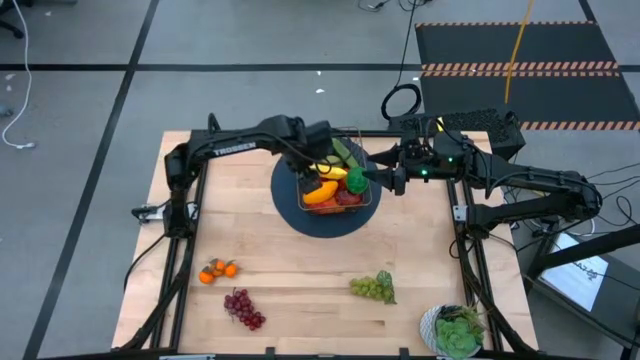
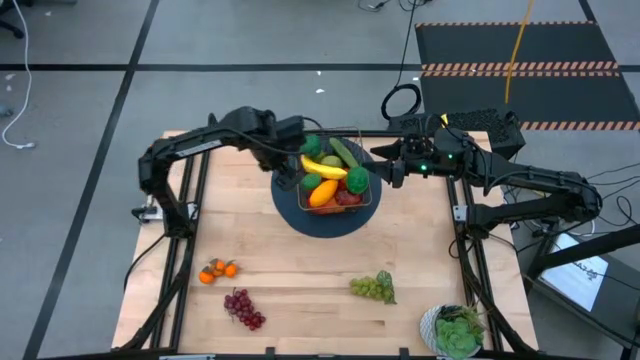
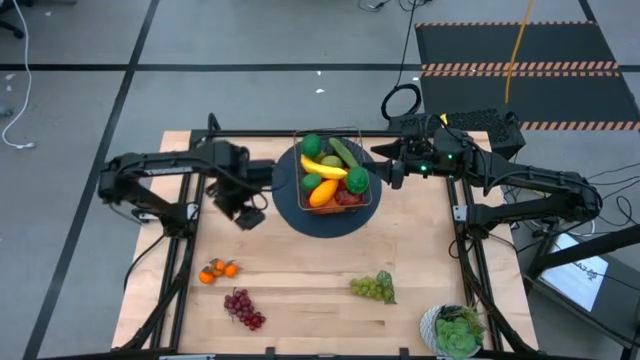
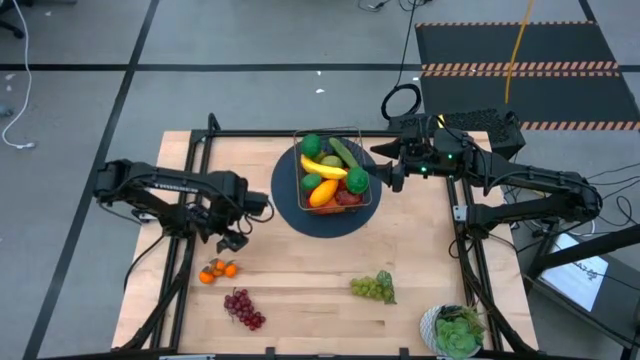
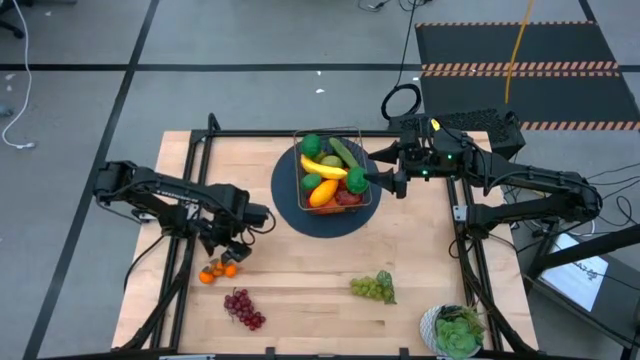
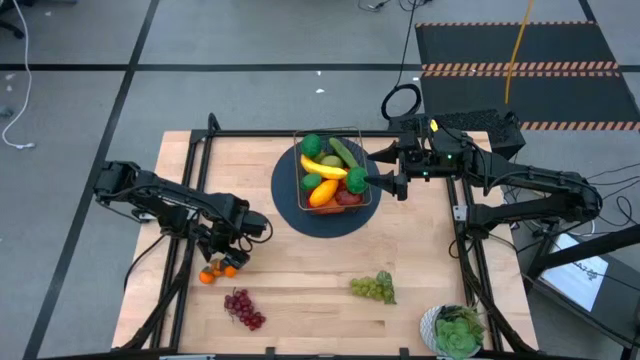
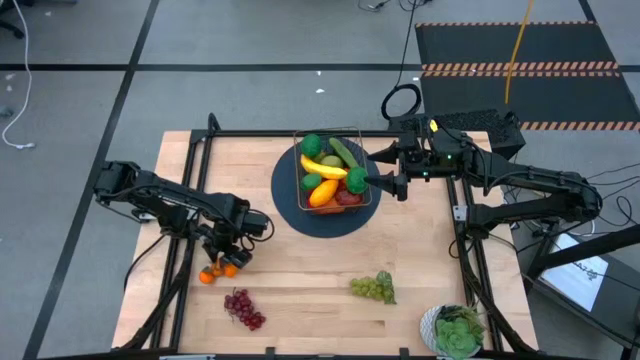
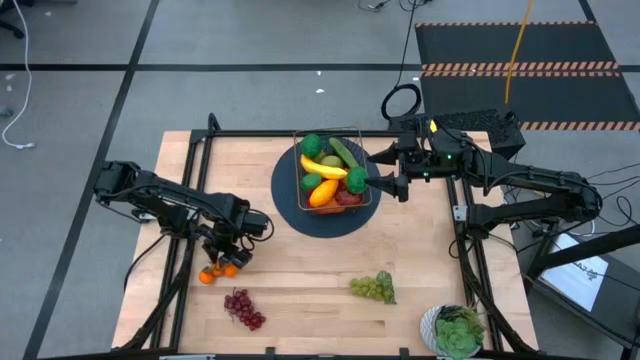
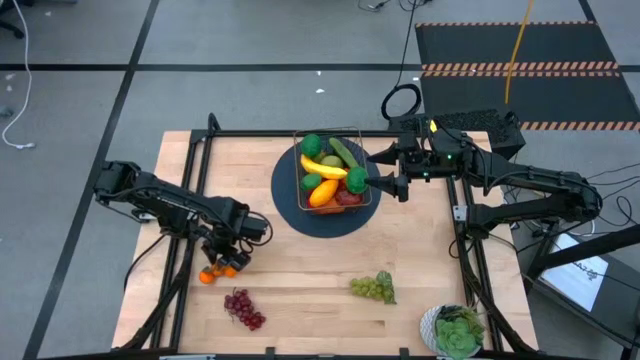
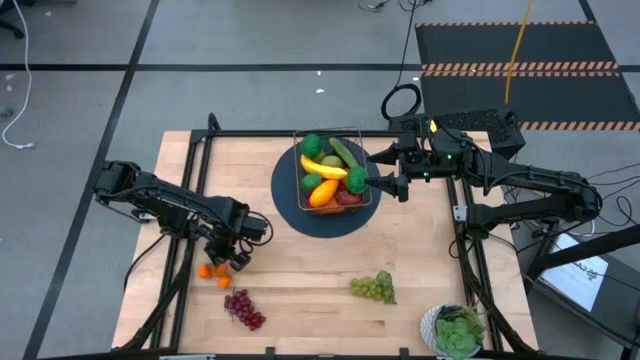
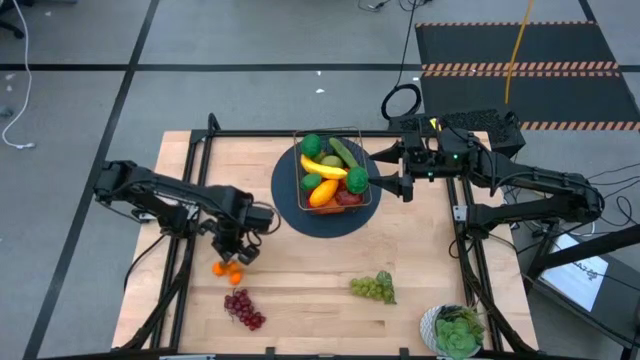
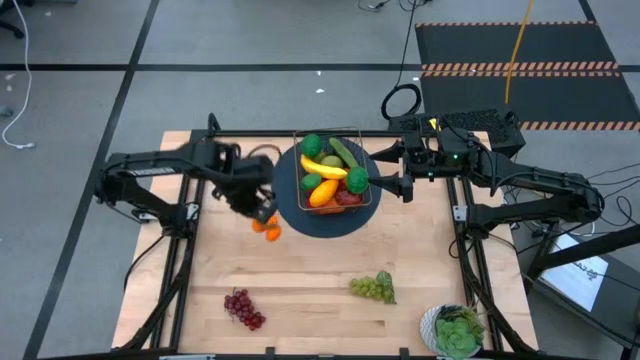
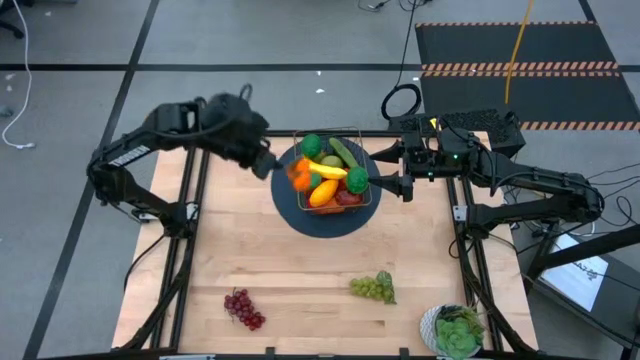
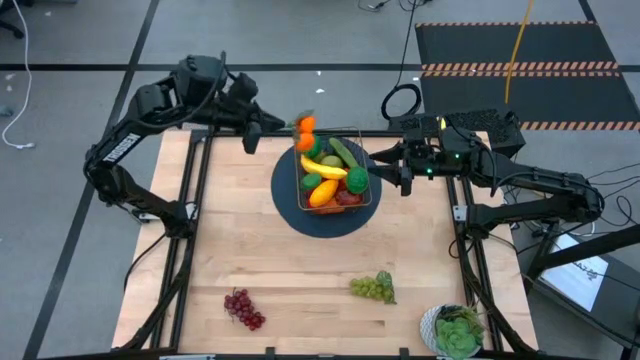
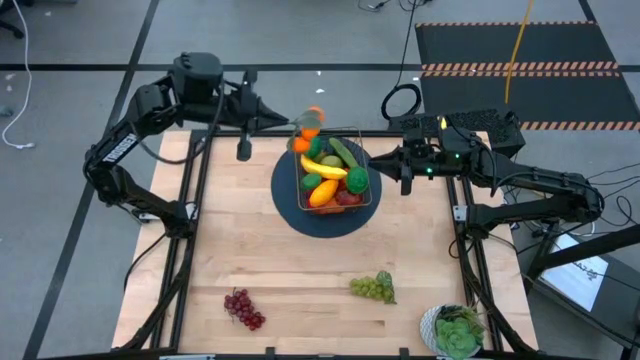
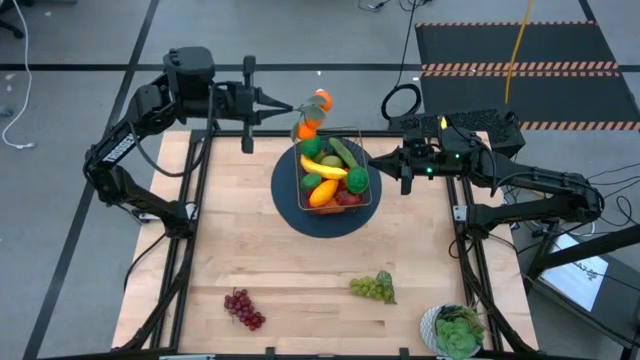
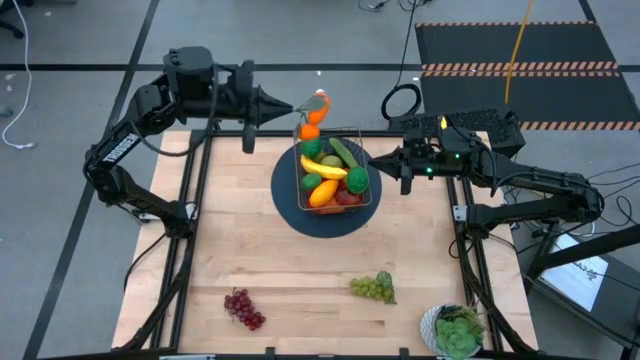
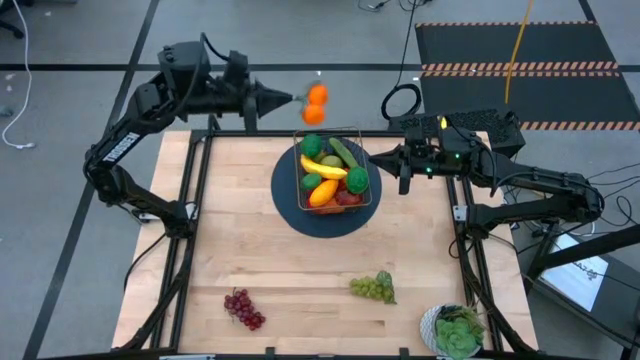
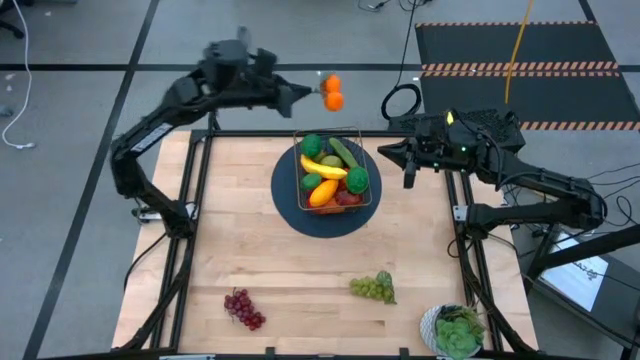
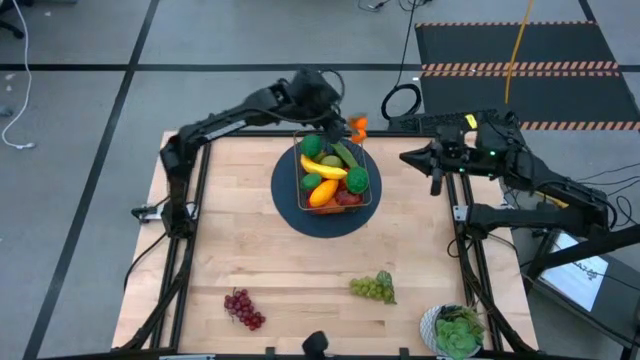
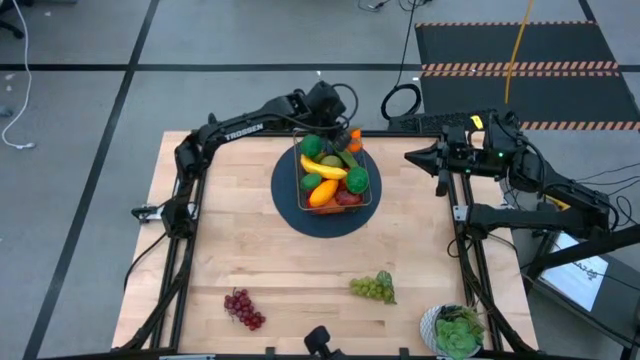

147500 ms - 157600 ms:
Task: Build produce basket
Put the tangerine into the gold wire basket

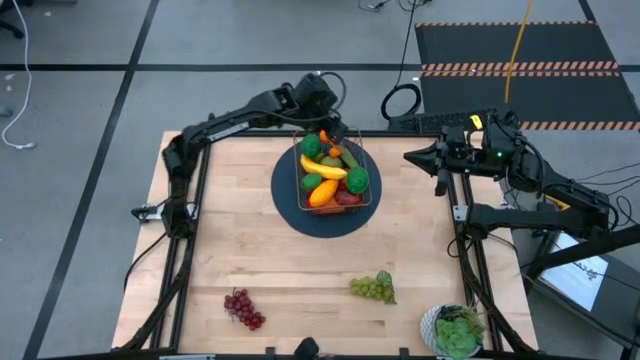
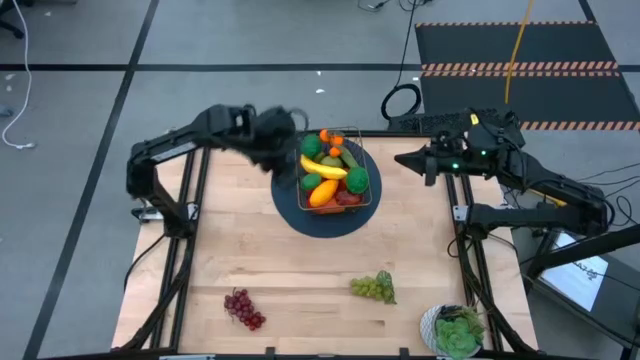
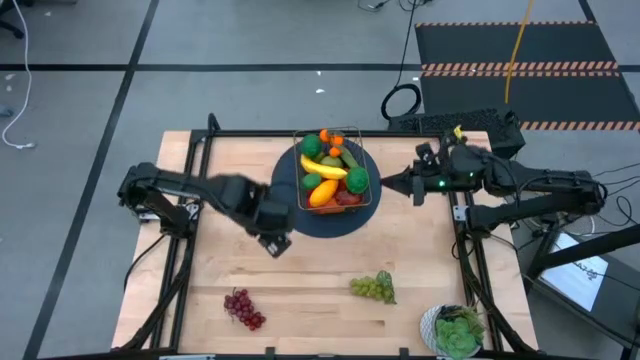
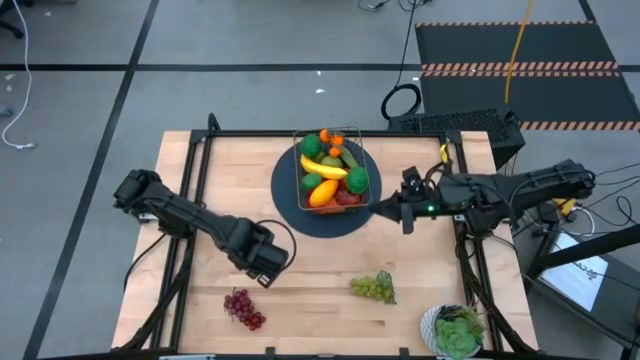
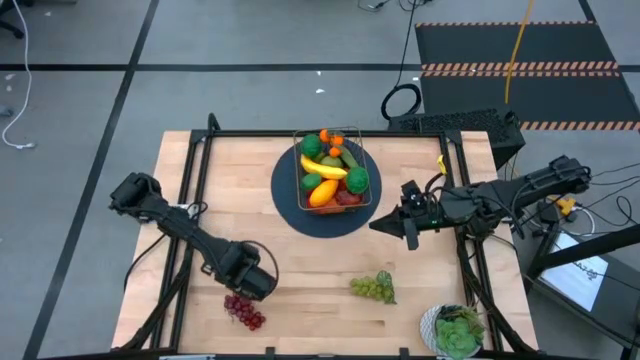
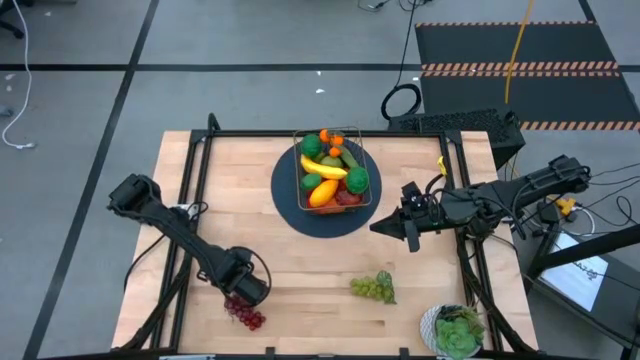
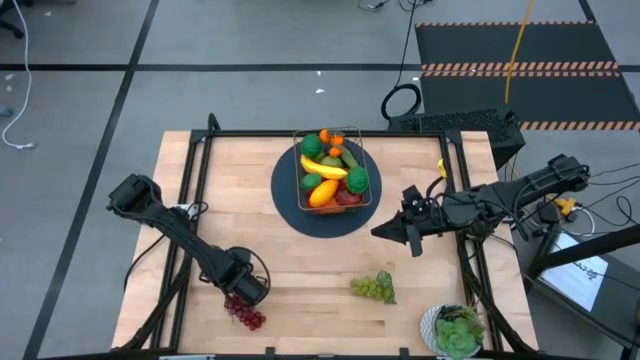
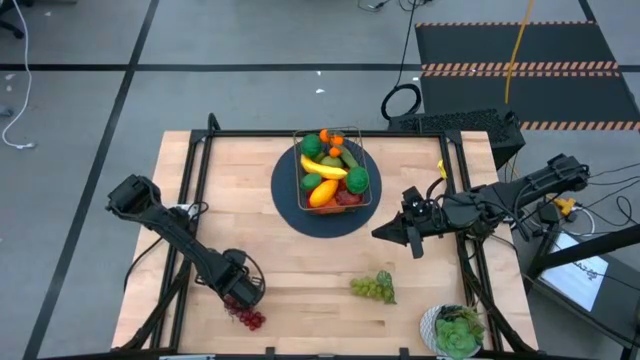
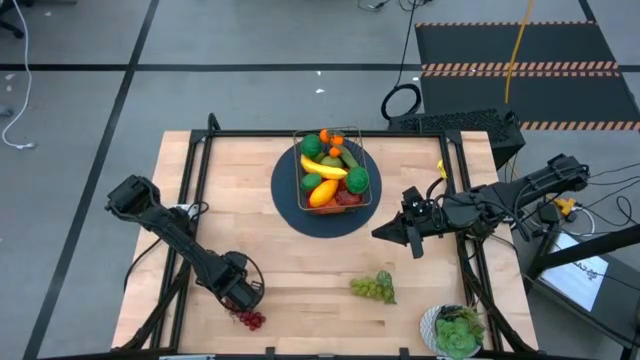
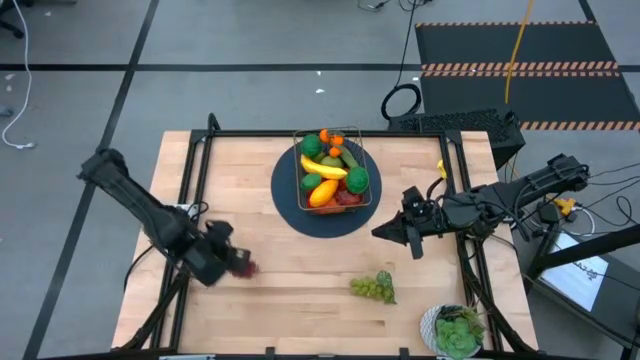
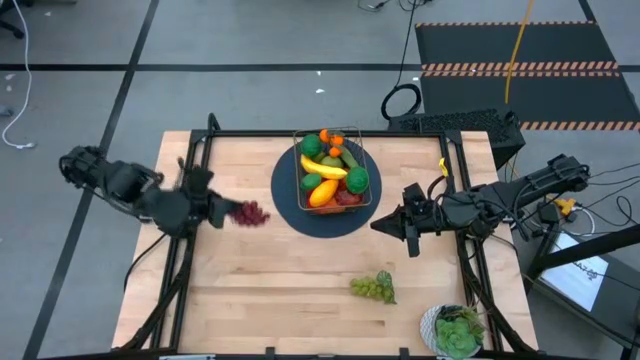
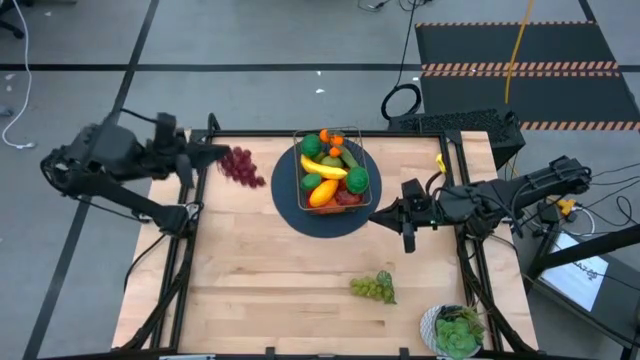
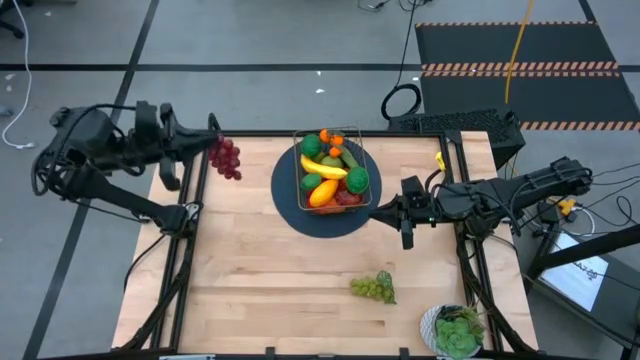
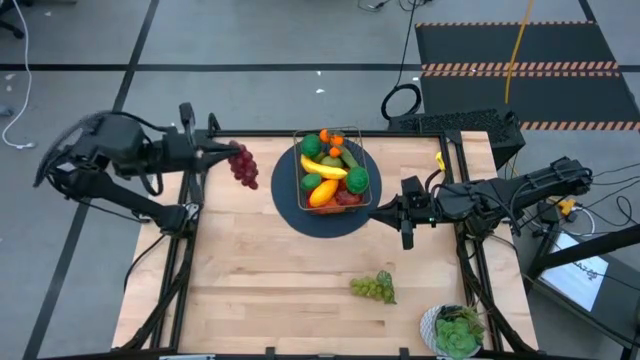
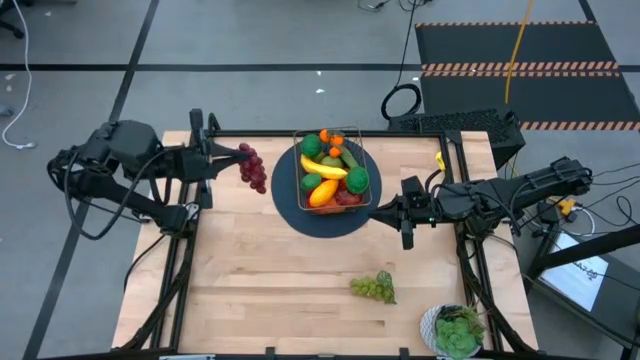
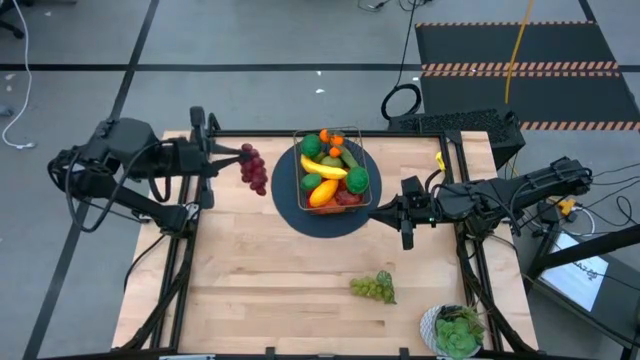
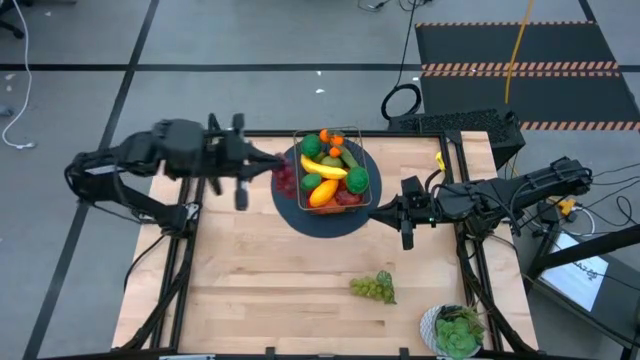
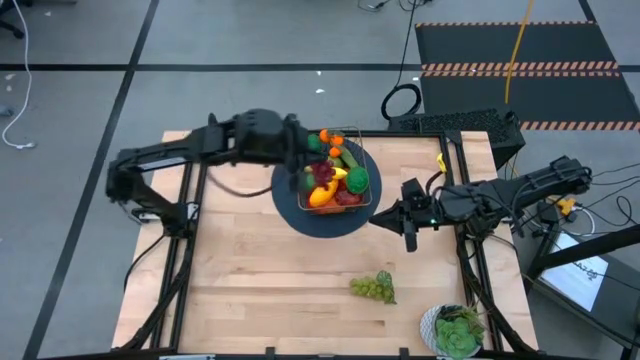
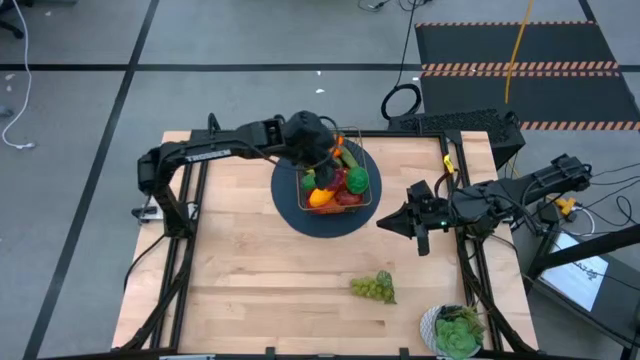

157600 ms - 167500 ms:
Put the red grapes into the gold wire basket

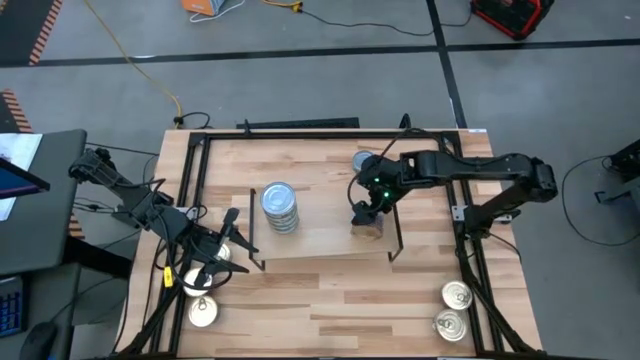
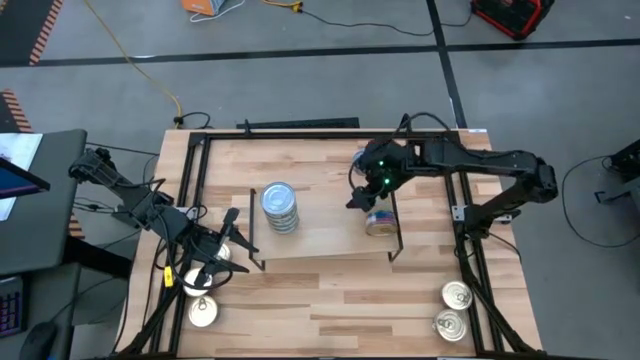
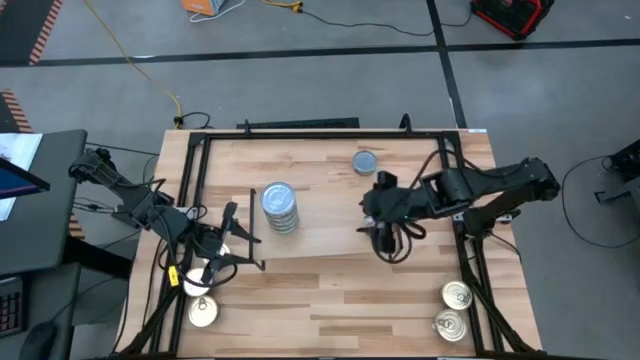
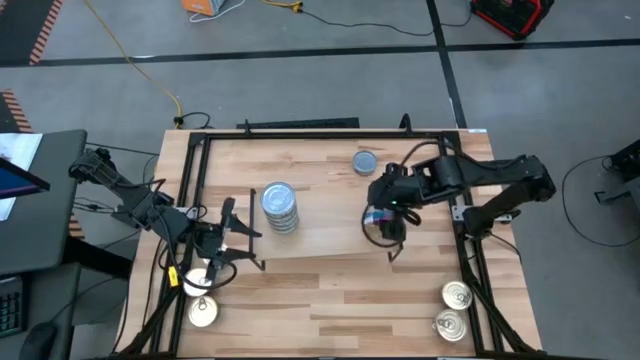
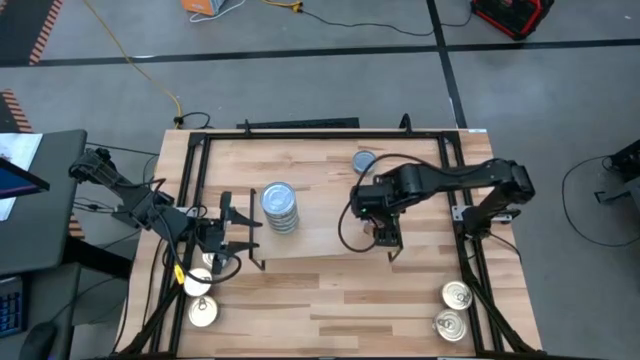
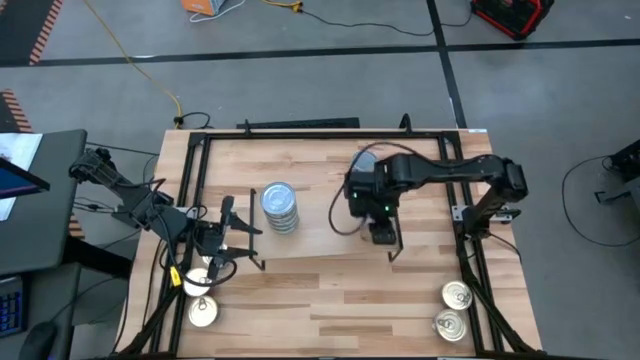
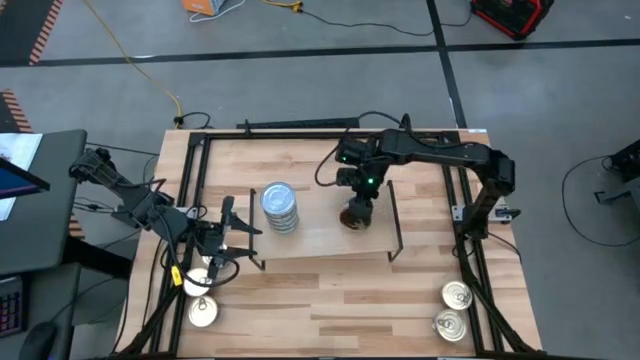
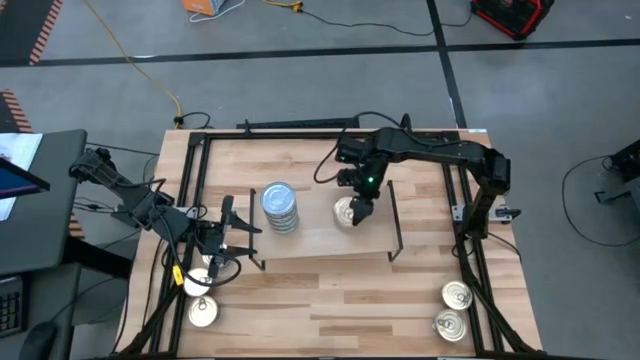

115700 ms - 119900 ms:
Task: Stack canned seafood by type on shelf
Put the blue tuna can on the shelf
